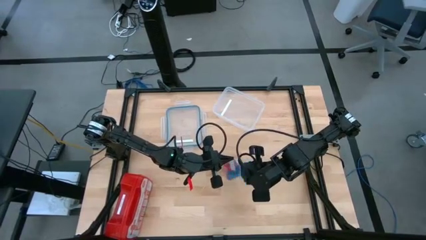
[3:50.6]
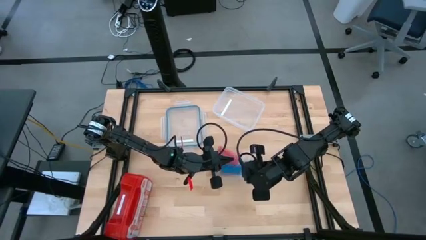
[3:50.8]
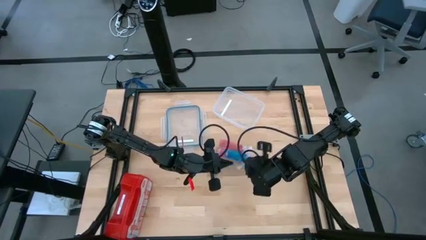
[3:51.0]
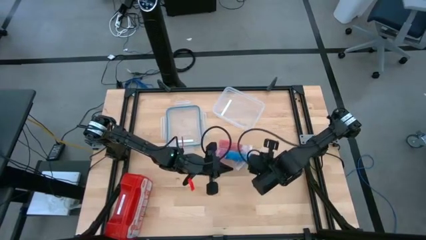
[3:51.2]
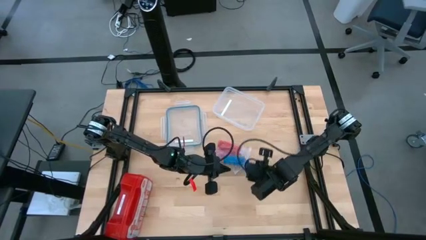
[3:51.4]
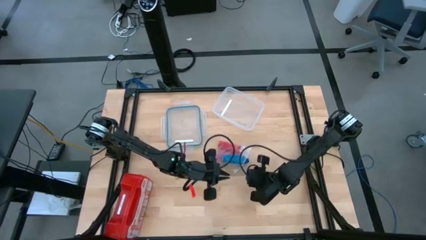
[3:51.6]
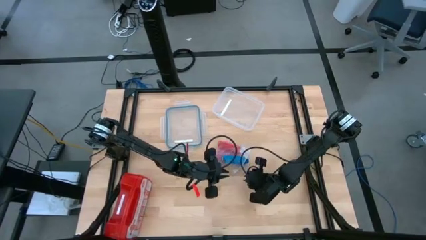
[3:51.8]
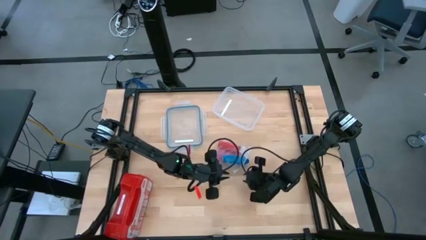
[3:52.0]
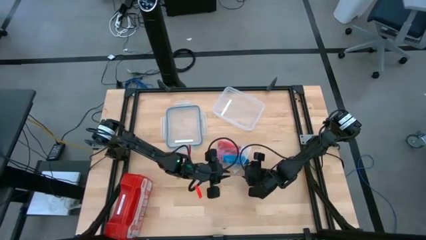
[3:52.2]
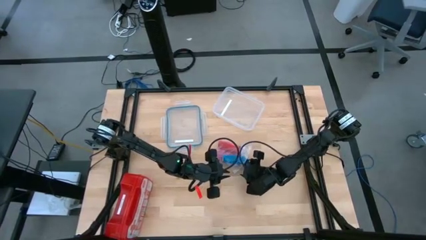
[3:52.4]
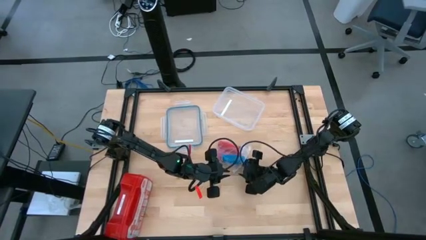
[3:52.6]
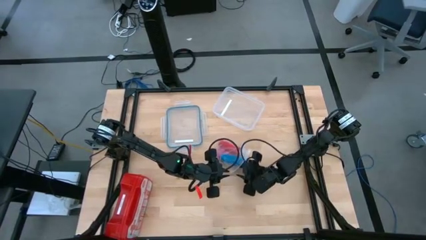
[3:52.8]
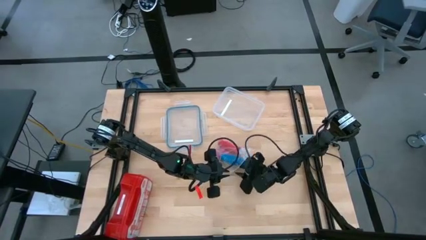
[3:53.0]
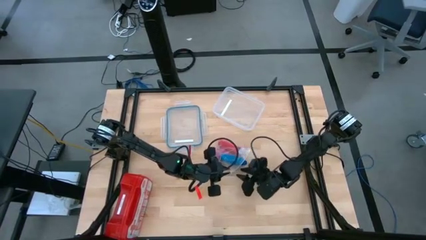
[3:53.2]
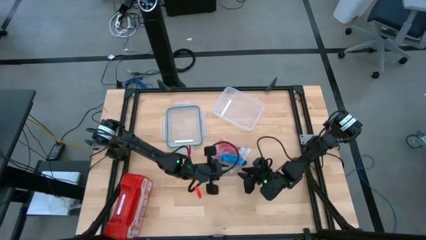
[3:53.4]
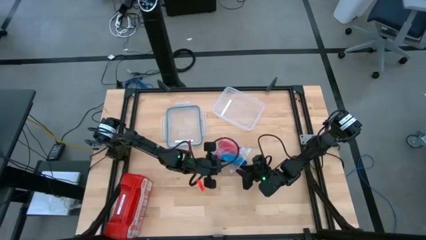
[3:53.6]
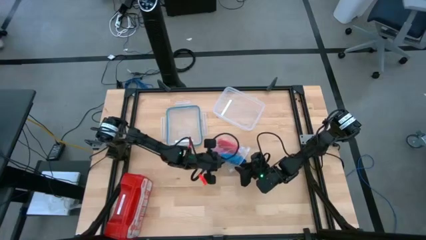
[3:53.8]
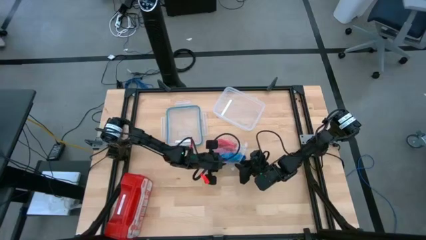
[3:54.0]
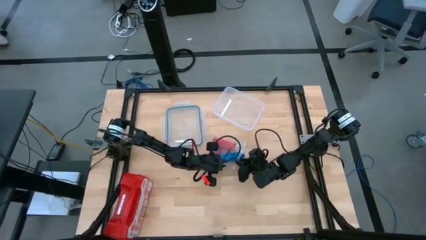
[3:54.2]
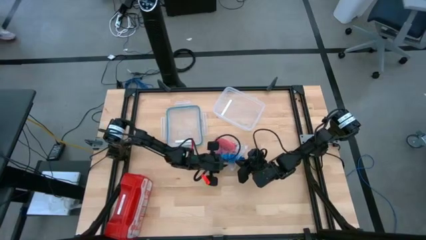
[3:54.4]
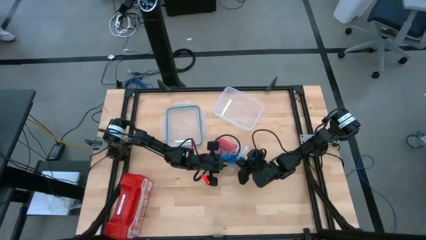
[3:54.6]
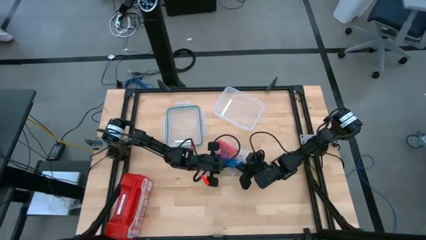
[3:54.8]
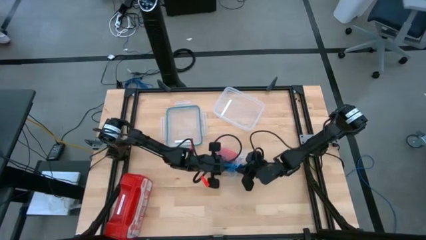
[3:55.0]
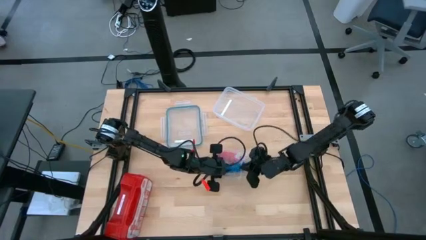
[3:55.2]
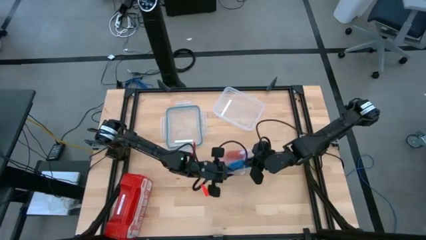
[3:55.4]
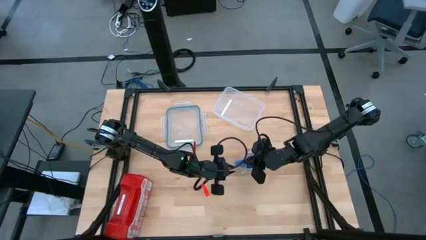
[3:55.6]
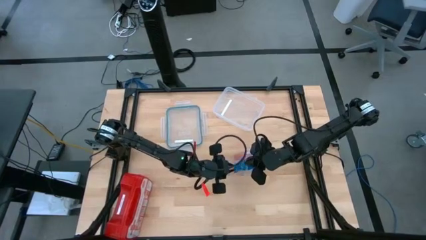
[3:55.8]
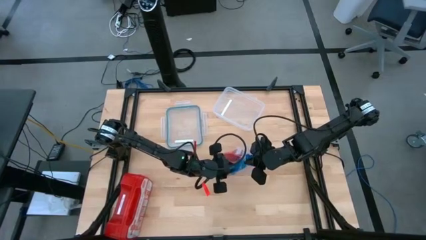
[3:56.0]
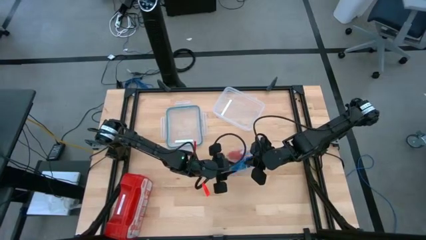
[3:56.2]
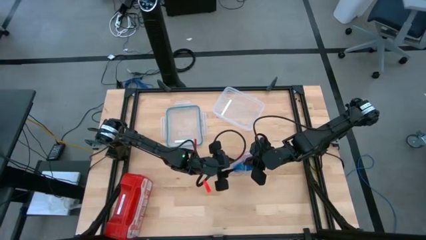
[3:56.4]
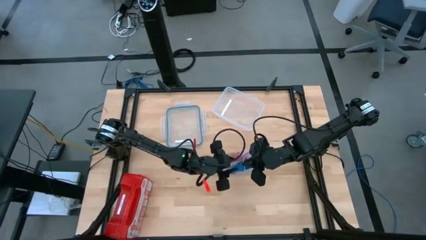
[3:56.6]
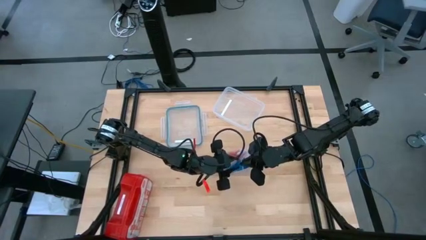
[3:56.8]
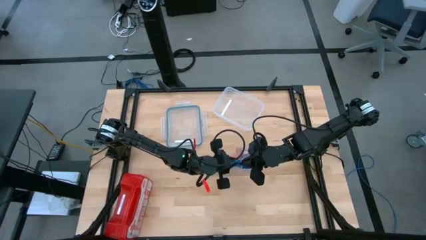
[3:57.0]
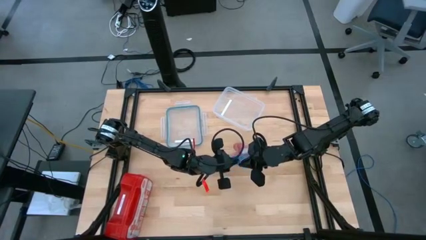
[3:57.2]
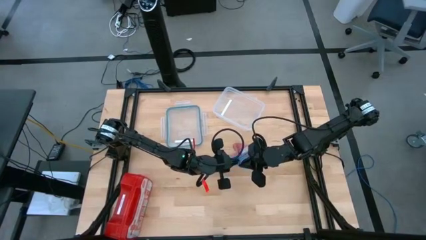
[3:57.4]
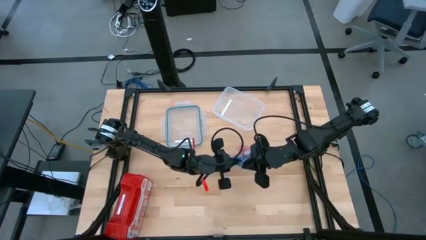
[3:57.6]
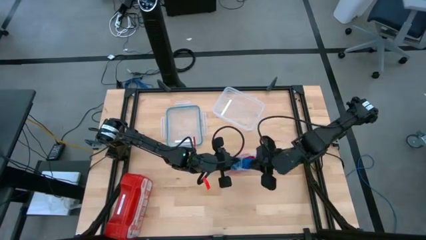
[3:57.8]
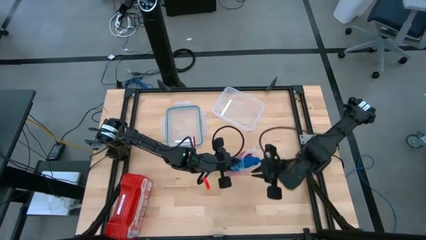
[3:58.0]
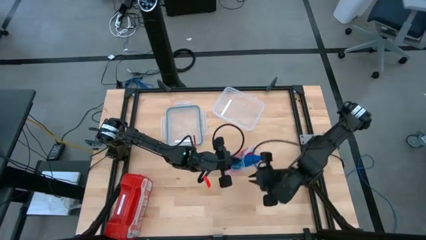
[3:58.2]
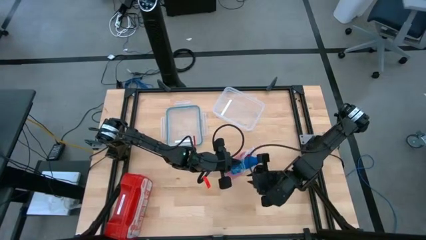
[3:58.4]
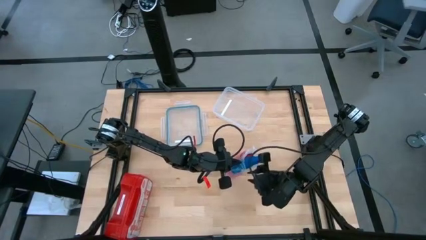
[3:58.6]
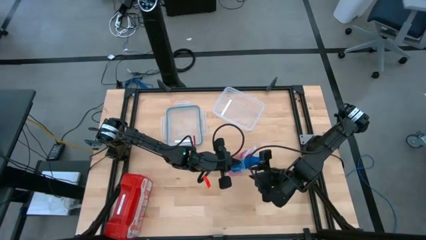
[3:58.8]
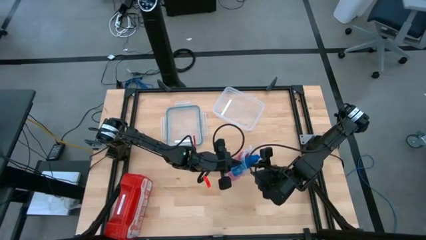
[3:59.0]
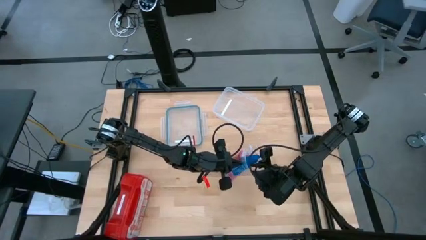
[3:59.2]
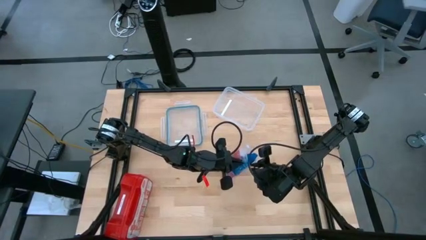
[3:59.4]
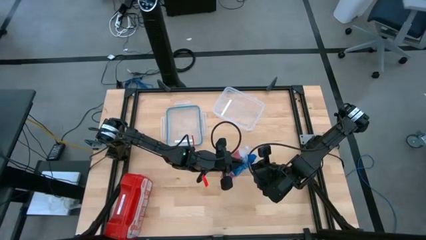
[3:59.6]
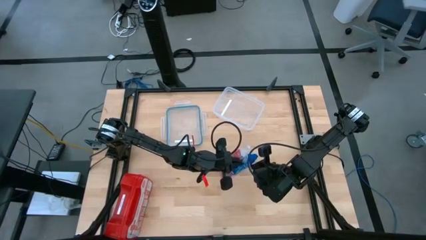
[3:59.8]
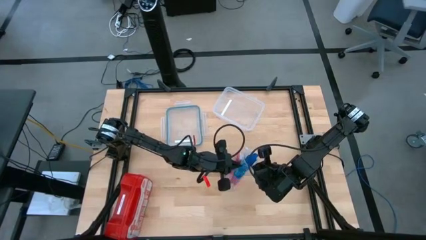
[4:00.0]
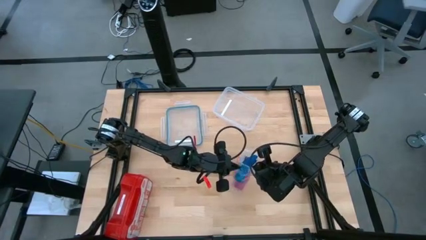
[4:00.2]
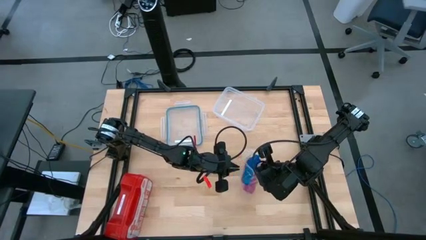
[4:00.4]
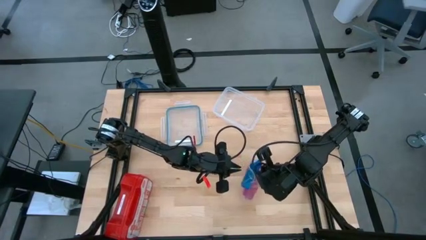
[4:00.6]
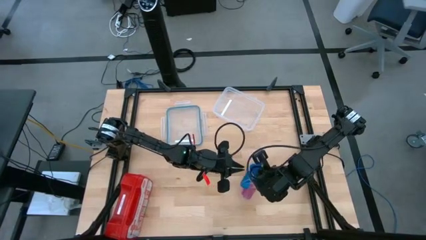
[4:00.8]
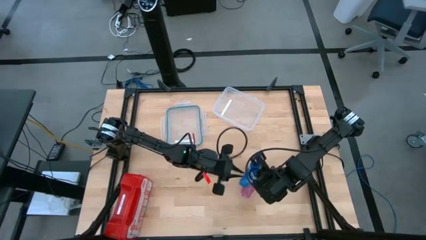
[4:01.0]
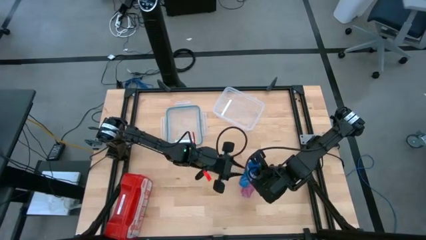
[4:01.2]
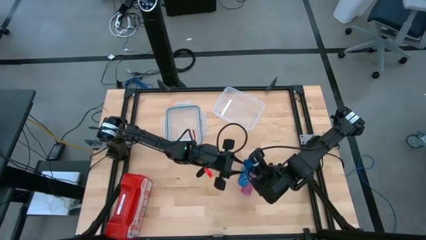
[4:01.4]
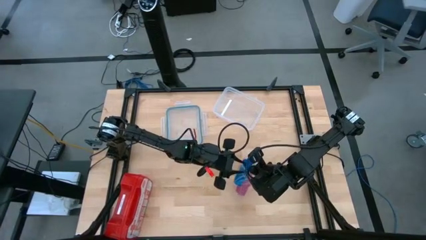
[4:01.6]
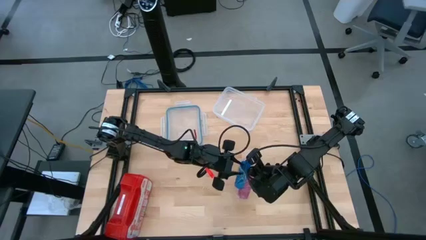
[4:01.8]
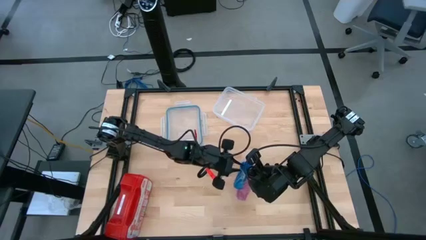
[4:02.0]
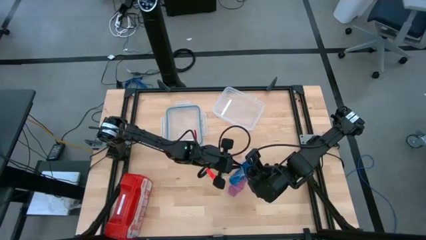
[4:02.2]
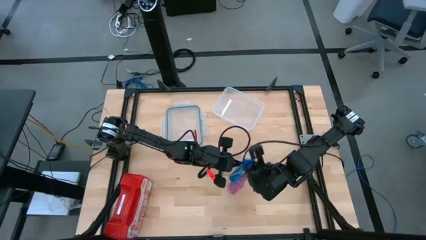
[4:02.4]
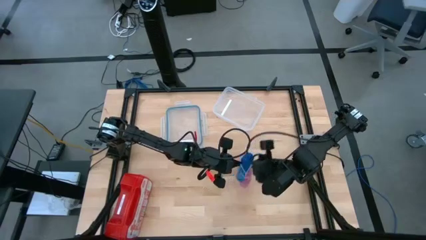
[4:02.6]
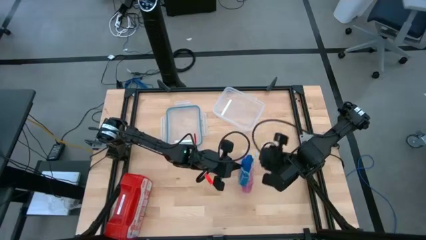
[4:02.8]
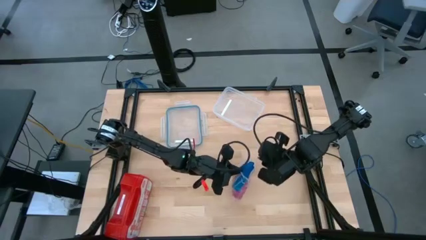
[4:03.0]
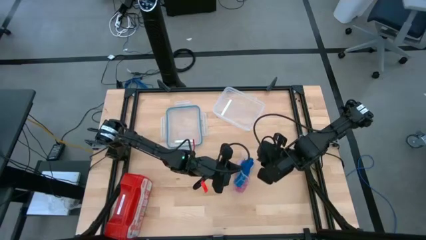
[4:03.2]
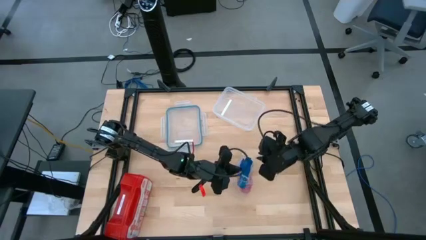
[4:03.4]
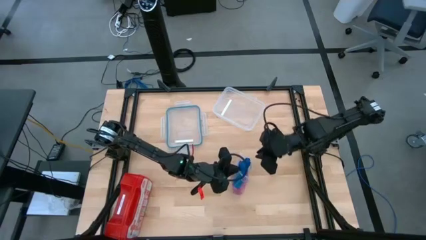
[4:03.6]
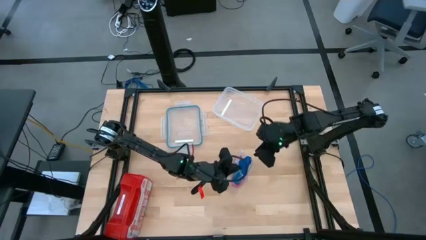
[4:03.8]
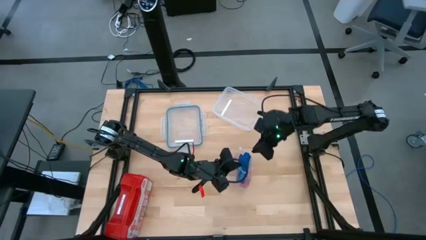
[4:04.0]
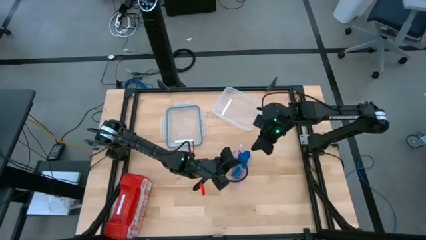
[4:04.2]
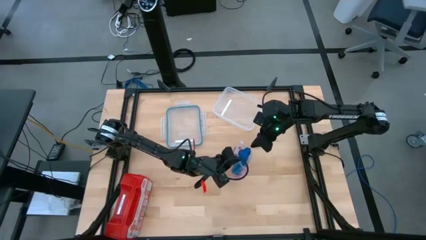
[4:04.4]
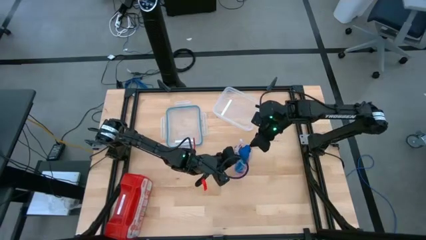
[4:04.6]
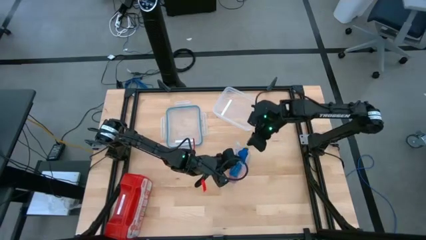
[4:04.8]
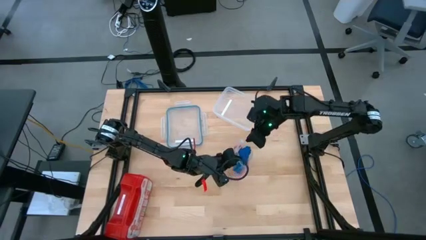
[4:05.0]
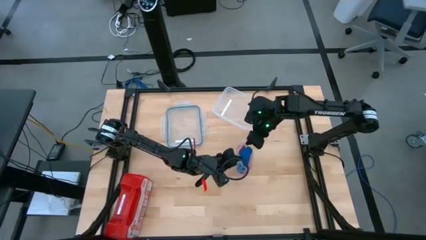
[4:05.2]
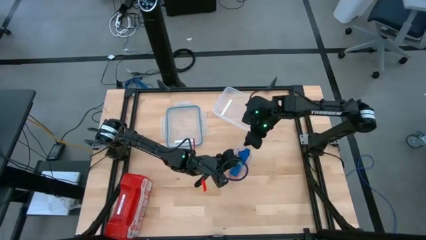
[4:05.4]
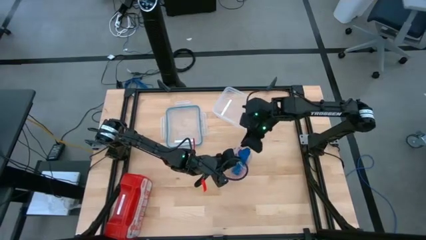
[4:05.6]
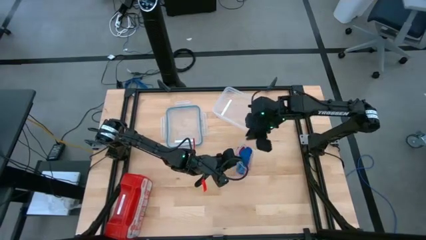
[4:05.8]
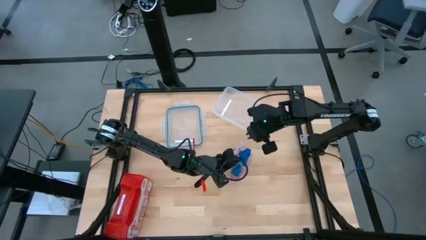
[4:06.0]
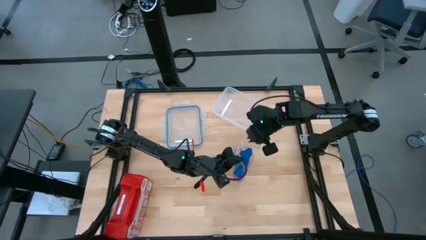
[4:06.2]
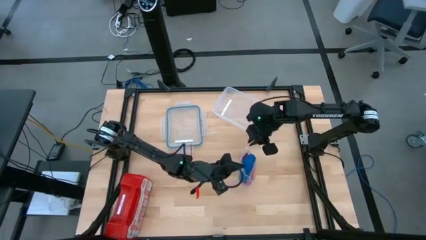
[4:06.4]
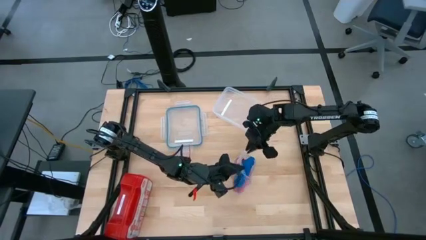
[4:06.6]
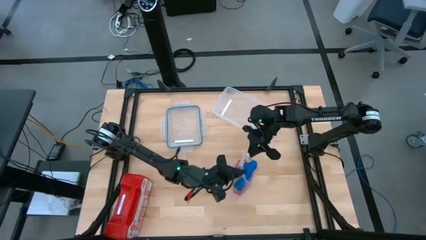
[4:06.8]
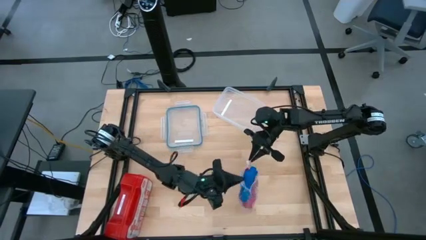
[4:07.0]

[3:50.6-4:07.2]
Task: Roll bandage
Put the blue bandage into the transparent zip bag

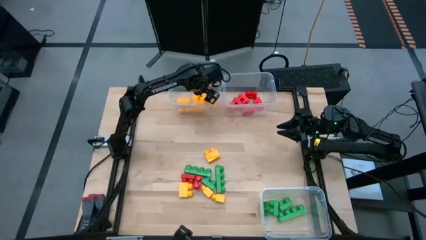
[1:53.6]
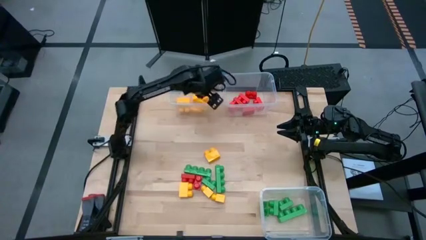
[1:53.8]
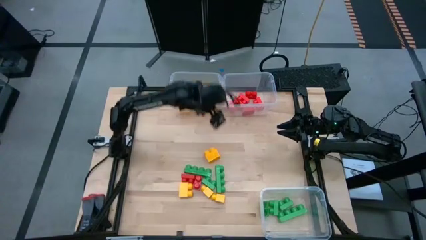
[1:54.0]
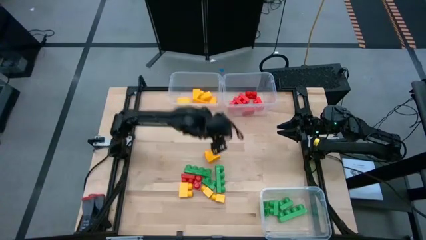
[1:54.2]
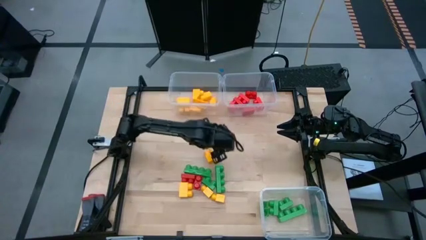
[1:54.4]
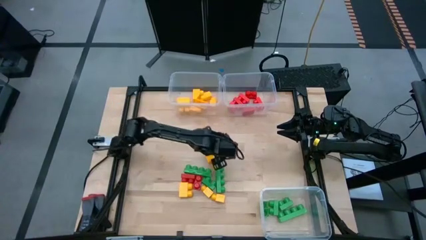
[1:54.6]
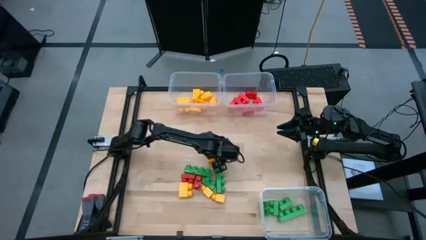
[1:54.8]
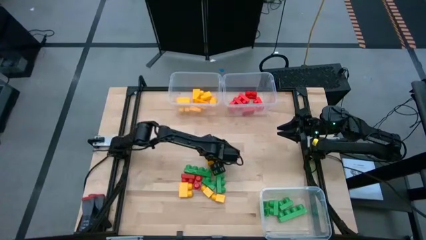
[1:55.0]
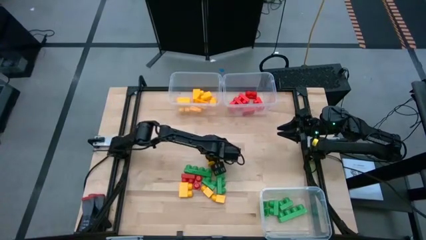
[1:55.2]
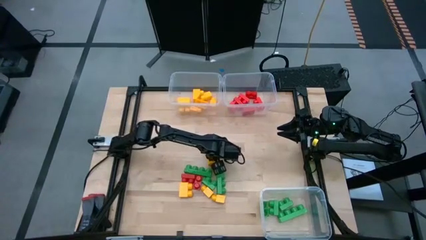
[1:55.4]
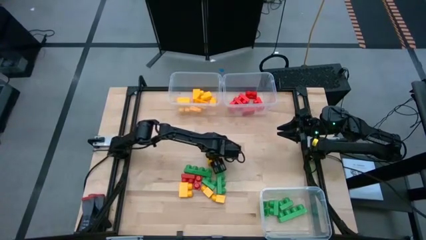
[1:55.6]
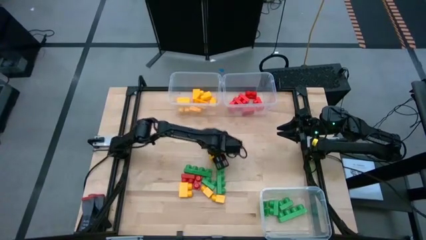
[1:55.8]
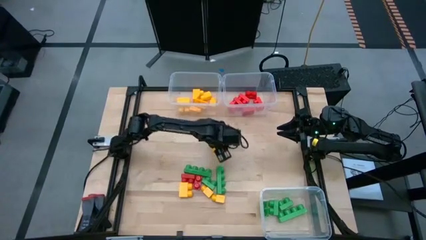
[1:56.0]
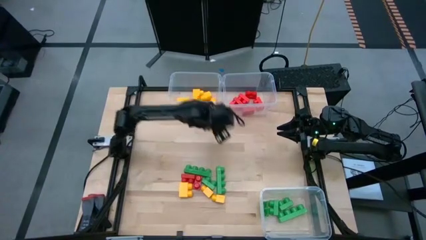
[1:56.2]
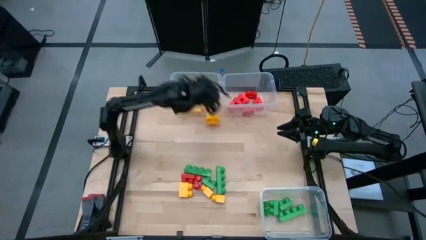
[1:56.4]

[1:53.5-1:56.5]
Task: Sort blocks
Put the yellow game piece into the top left transparent bin
